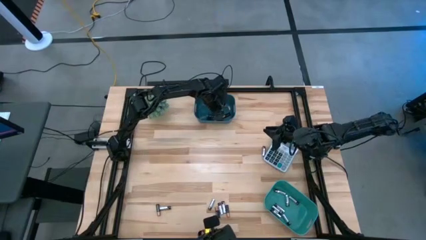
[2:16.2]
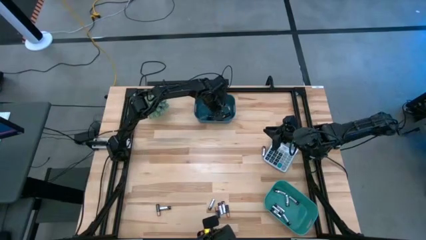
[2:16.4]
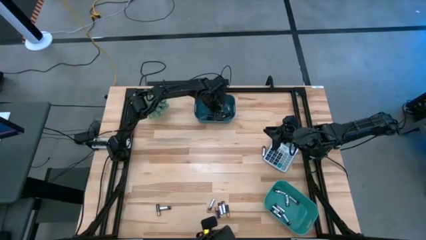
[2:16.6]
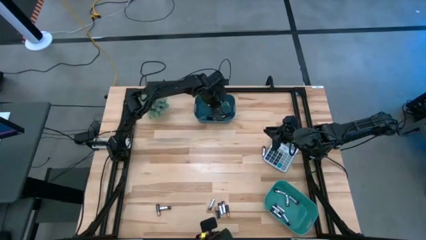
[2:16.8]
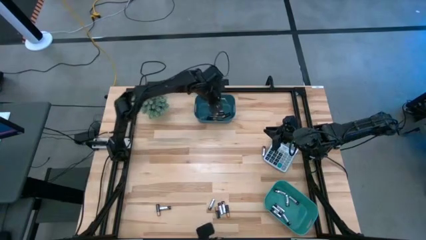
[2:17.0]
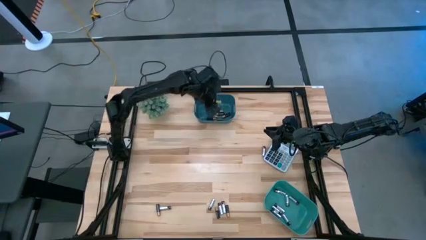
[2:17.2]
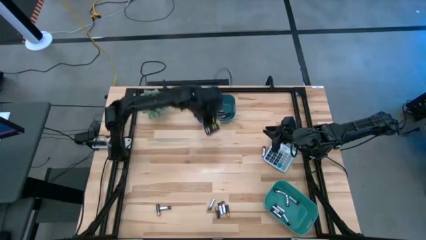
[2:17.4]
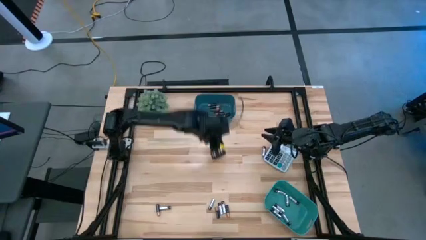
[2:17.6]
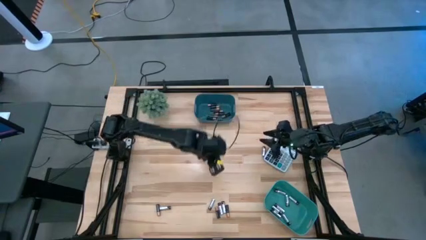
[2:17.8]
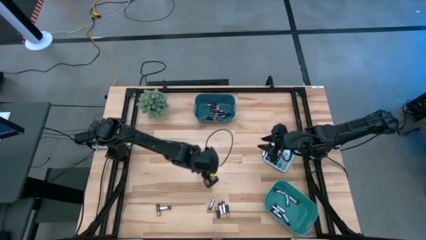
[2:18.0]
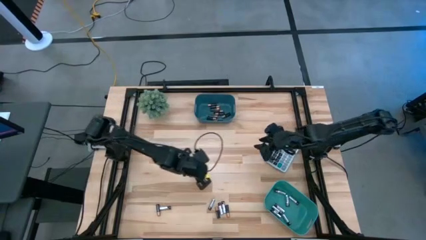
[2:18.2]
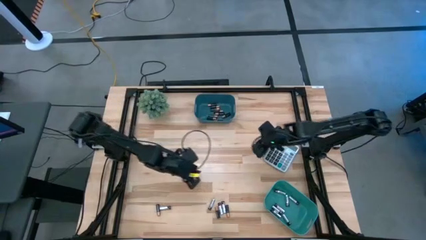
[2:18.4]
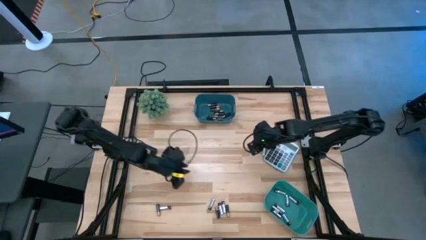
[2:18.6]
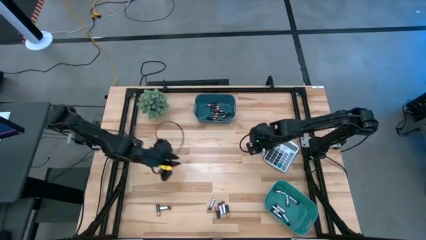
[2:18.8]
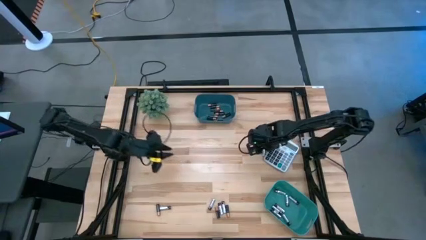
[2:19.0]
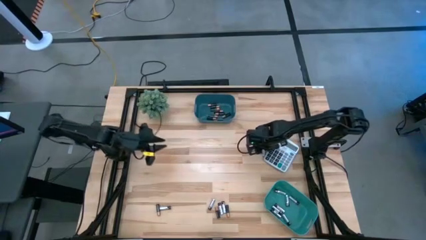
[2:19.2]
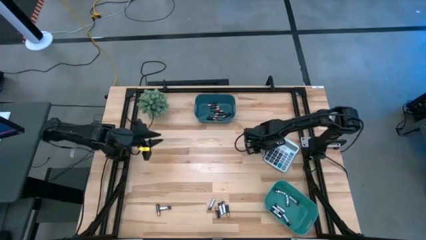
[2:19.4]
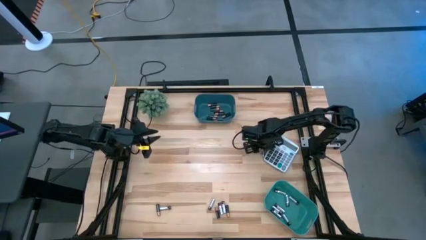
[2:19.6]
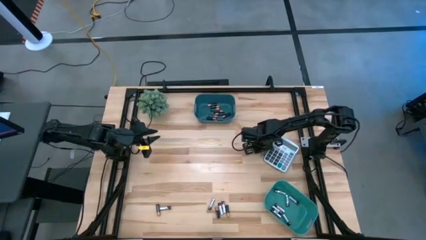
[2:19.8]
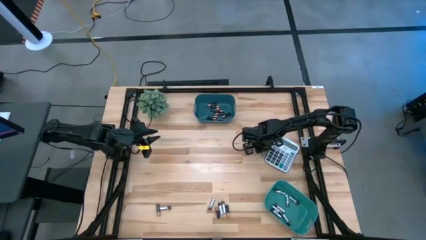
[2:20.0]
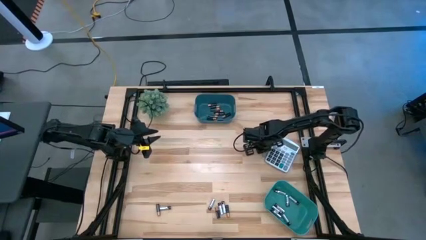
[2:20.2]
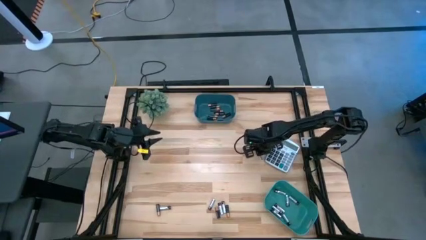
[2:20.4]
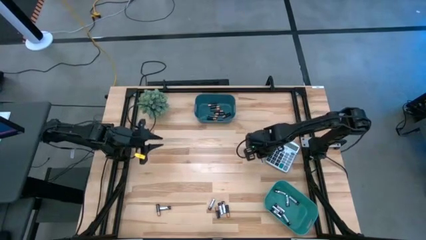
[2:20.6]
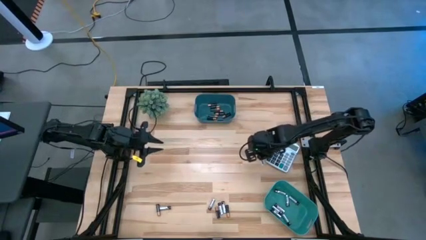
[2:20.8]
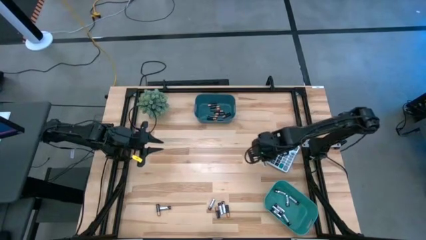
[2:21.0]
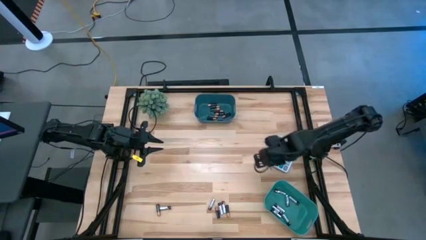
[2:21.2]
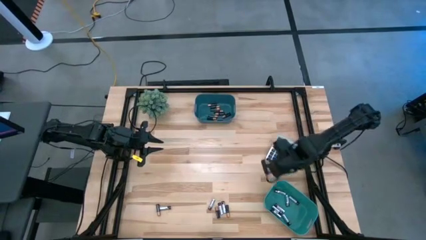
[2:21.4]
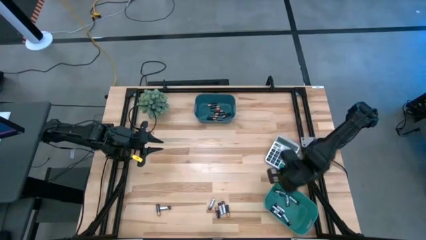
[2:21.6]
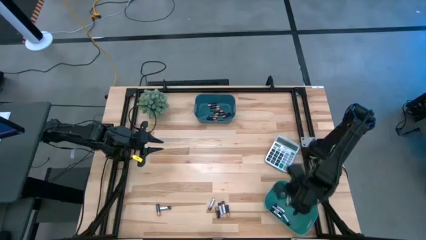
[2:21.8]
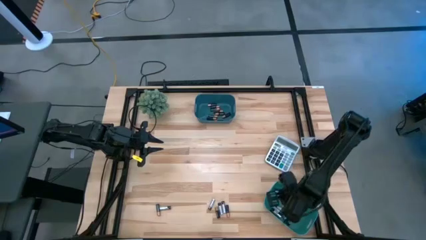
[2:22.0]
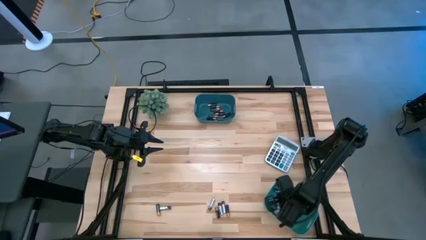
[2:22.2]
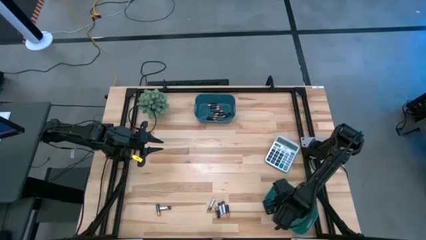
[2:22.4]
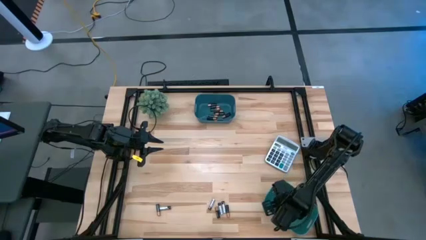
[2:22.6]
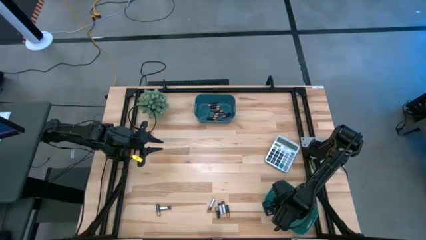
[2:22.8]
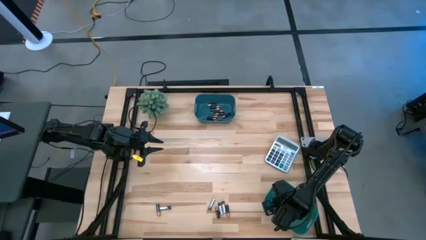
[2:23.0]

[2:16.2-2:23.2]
Task: Sort batteries
Put the silver battery into the green bin

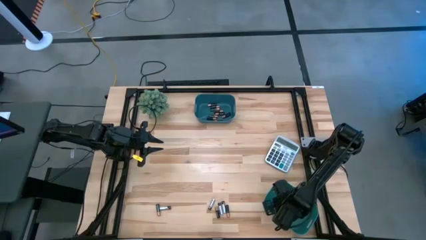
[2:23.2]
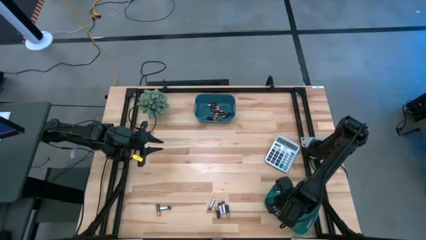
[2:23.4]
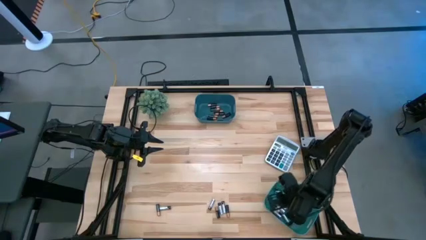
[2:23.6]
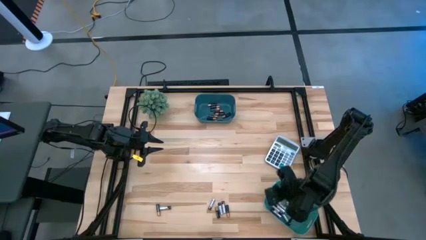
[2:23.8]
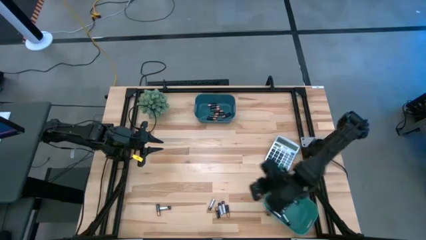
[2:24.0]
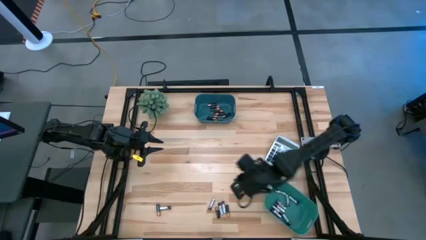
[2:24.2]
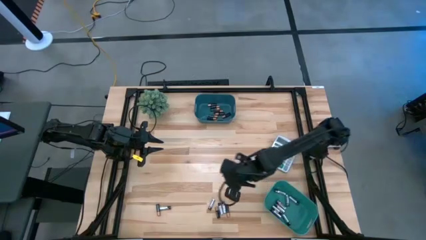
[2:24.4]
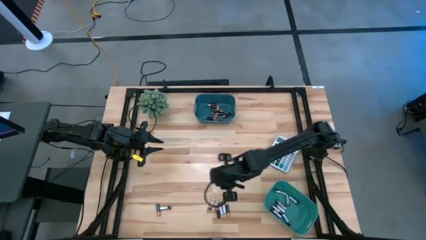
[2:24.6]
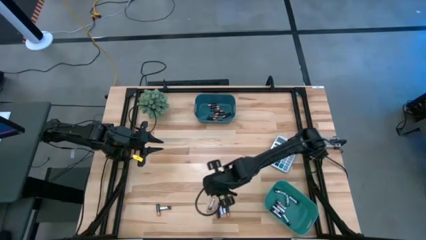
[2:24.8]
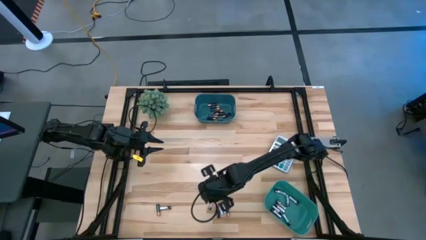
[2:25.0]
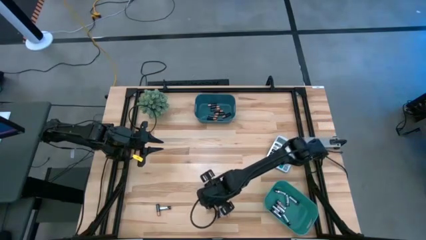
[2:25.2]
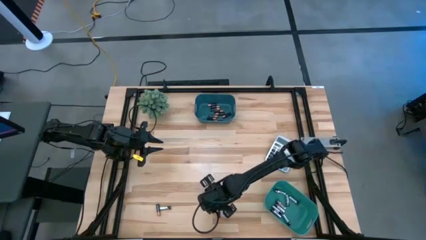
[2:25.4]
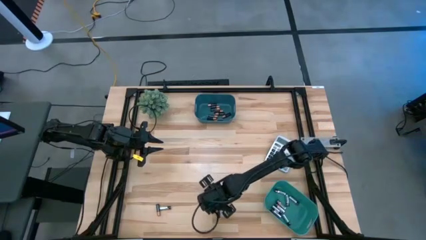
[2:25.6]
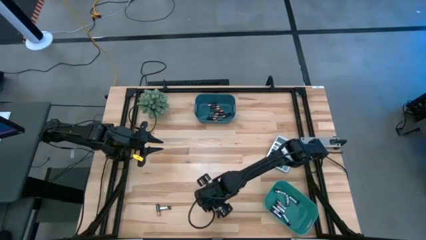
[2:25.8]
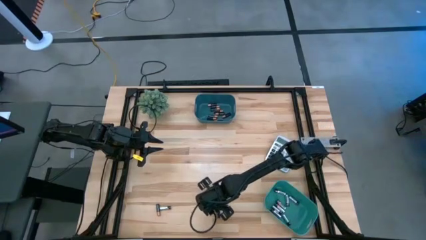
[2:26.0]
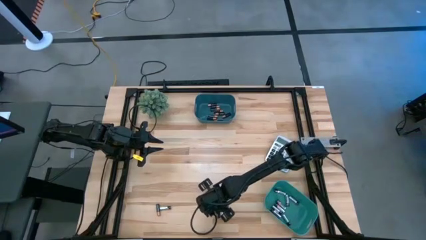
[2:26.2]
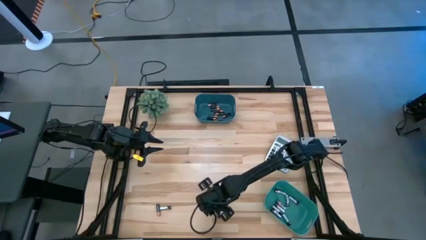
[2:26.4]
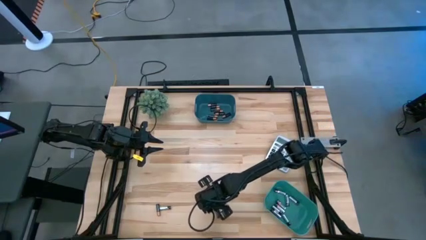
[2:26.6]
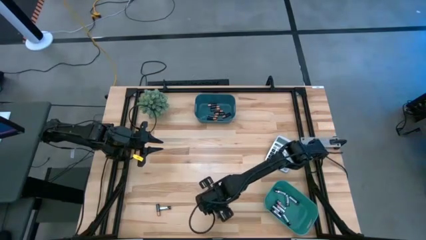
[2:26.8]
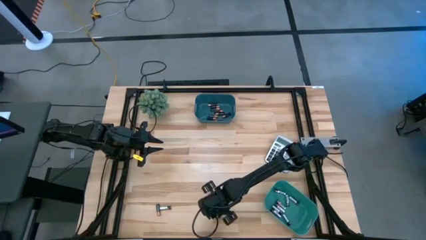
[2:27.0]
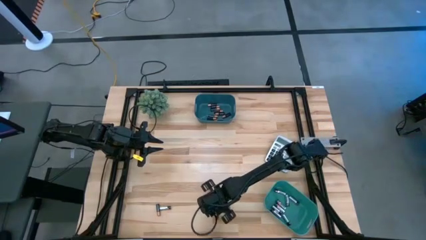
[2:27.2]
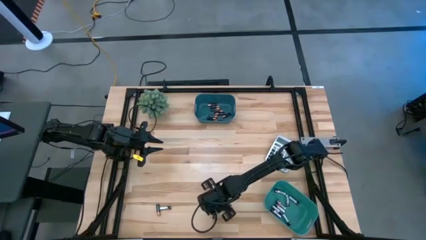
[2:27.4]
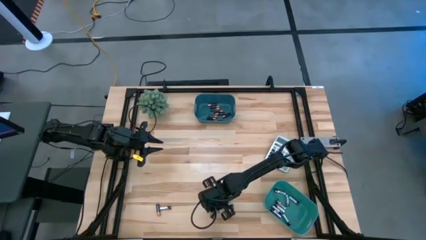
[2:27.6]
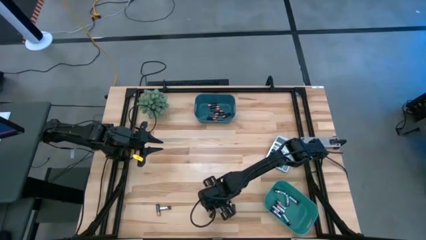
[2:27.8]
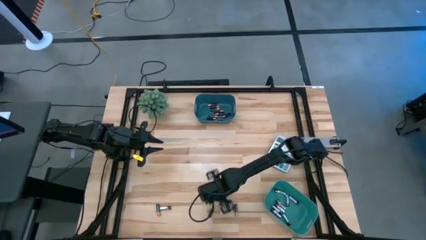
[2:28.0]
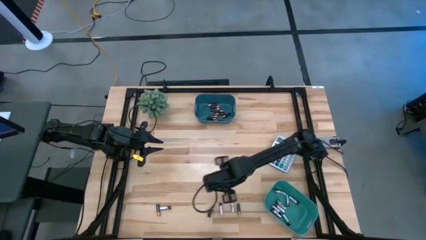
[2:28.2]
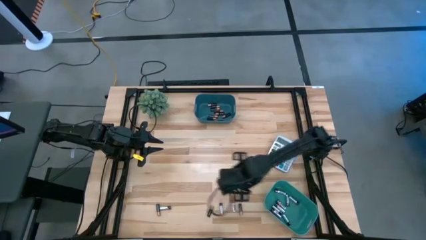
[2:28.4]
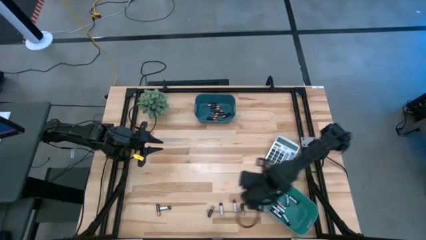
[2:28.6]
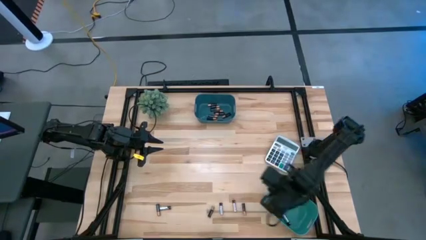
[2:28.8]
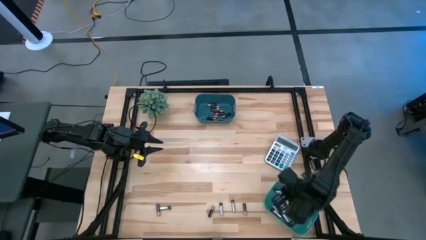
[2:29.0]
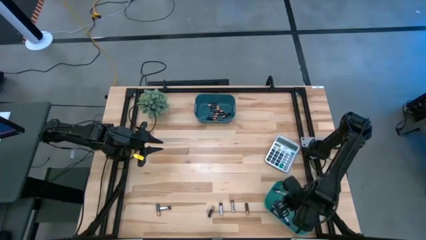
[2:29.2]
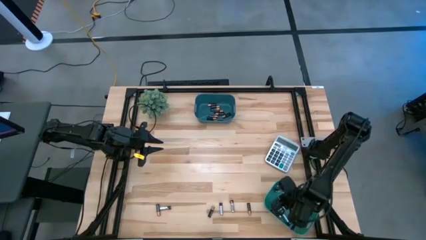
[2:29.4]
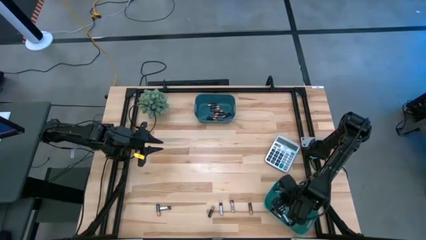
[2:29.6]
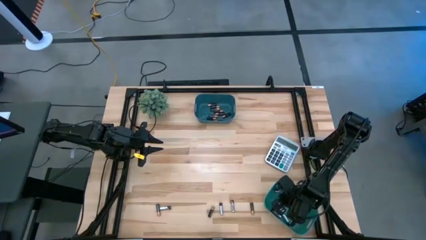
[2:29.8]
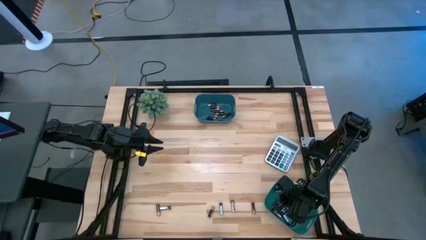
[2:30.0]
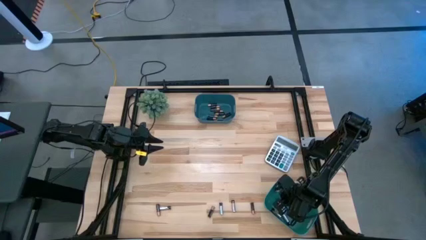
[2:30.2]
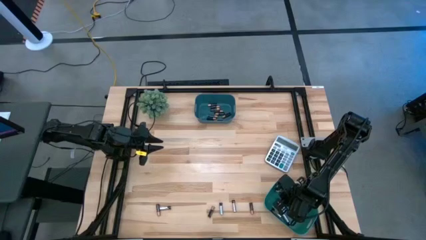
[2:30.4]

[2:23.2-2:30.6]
Put the silver battery into the green bin

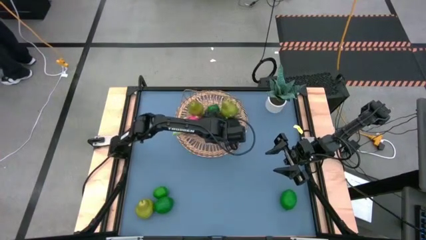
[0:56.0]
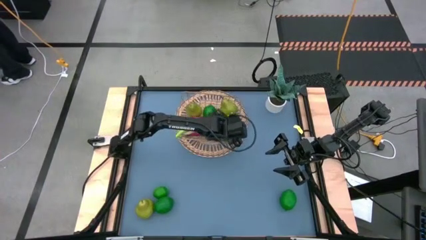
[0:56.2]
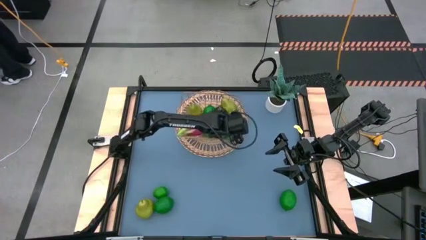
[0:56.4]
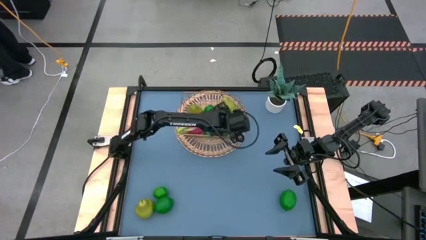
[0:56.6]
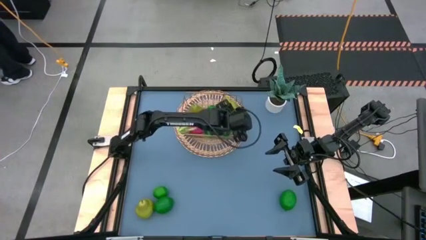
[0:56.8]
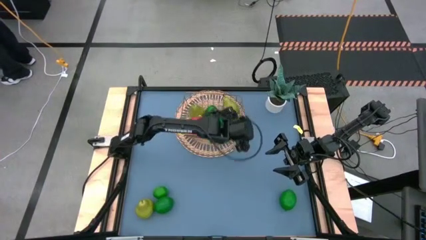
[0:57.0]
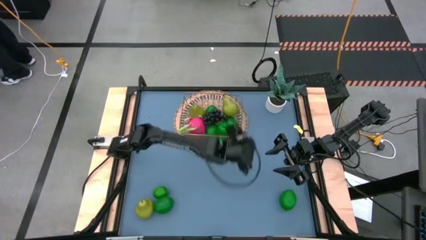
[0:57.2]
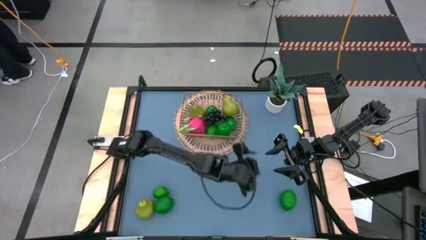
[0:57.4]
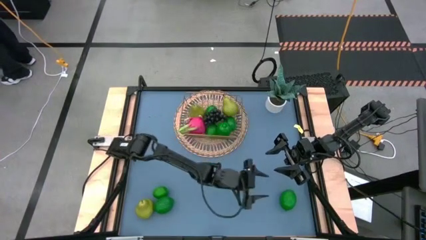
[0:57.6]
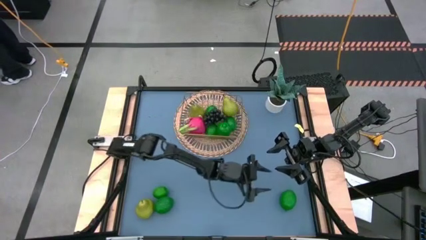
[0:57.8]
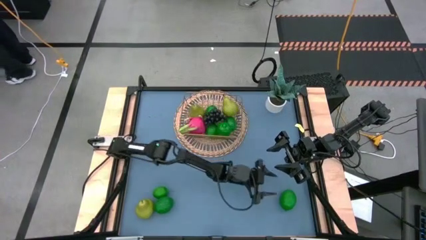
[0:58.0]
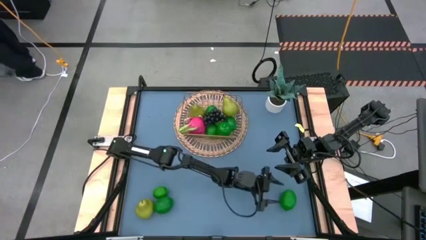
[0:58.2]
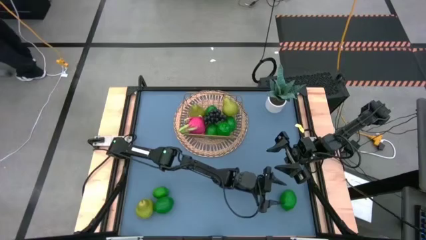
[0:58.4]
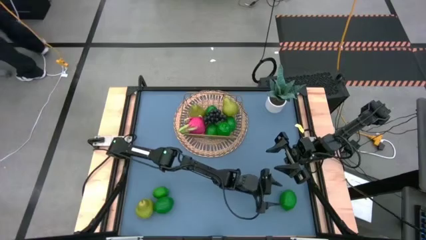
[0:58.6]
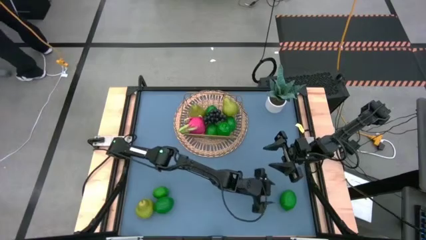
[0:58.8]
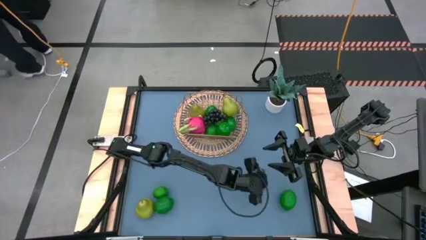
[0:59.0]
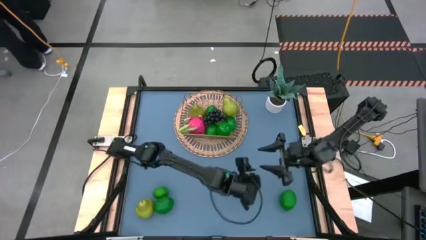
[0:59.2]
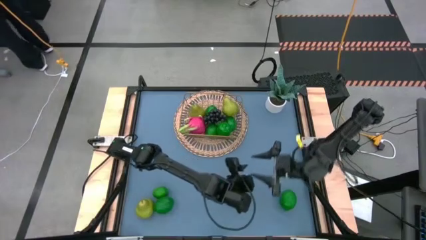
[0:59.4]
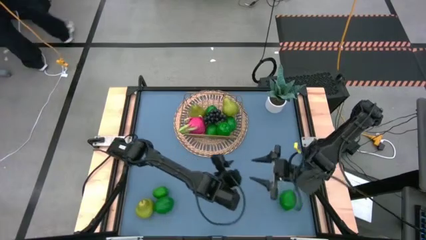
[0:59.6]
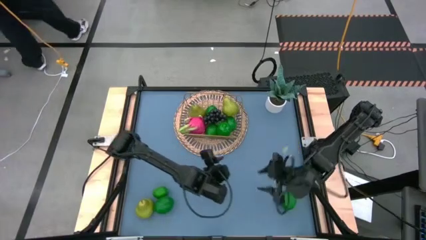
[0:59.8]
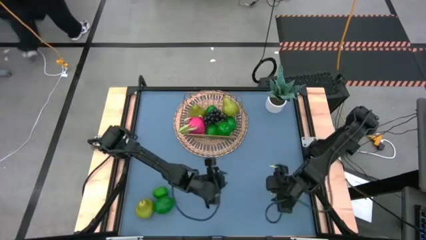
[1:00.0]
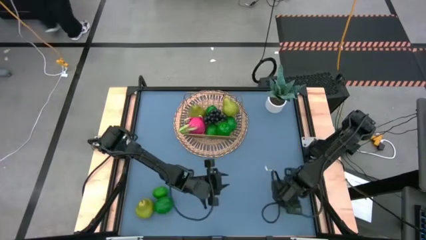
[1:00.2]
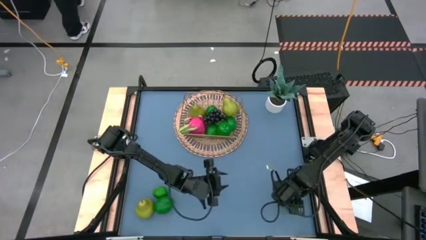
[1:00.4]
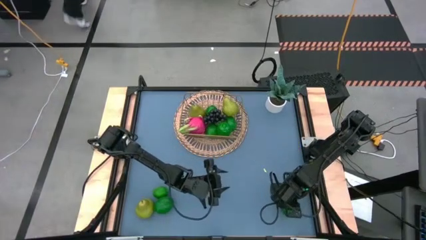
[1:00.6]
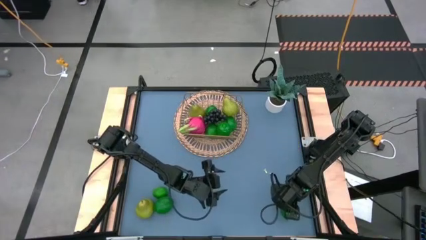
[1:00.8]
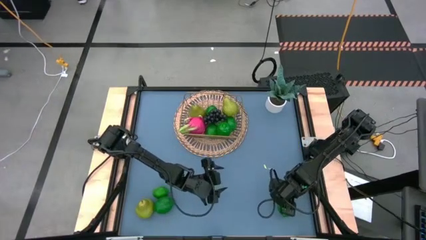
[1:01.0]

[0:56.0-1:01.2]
Task: Build produce basket
Put the green lime into the gold wire basket
